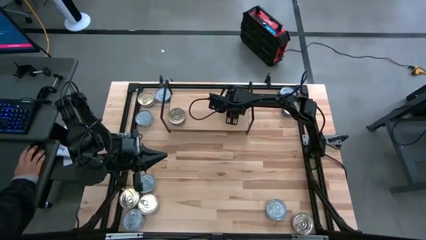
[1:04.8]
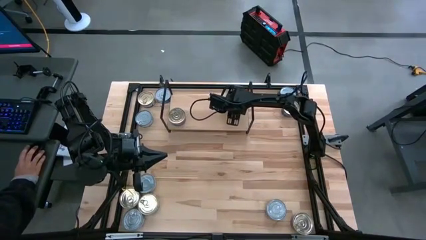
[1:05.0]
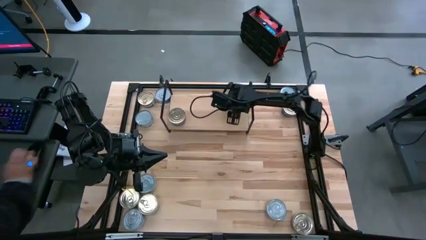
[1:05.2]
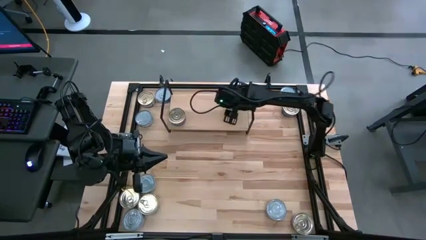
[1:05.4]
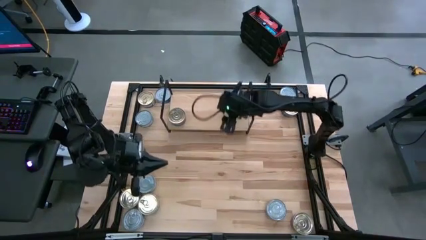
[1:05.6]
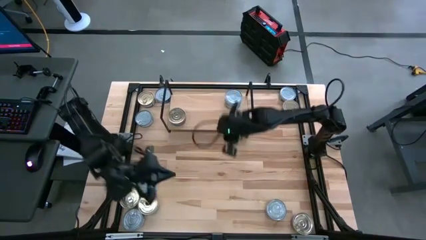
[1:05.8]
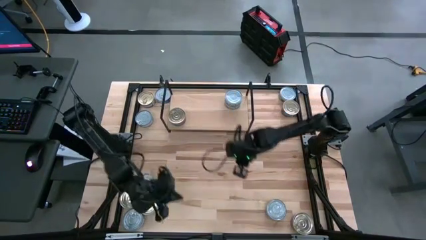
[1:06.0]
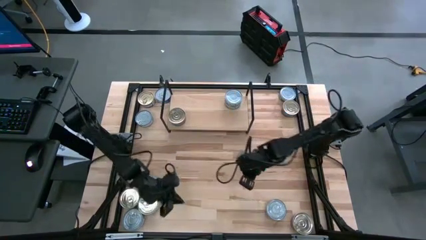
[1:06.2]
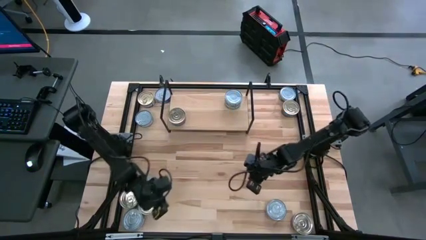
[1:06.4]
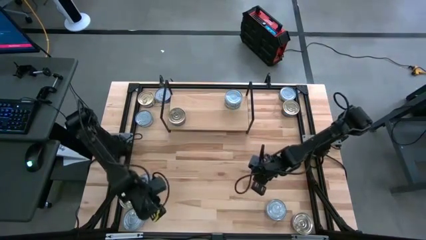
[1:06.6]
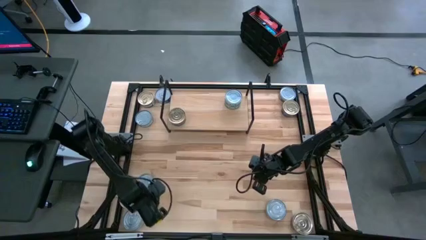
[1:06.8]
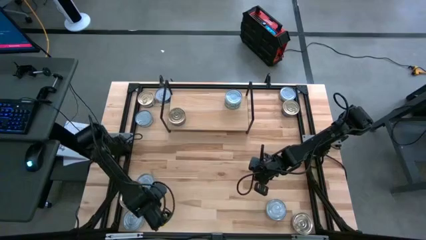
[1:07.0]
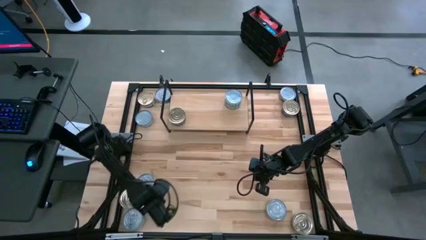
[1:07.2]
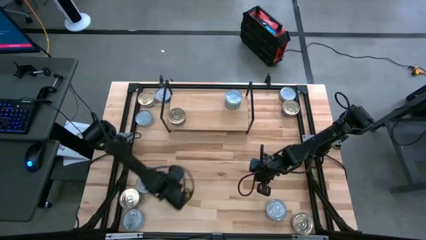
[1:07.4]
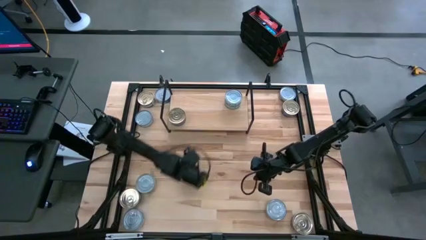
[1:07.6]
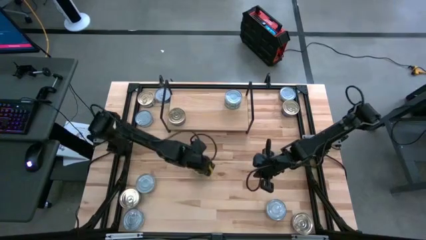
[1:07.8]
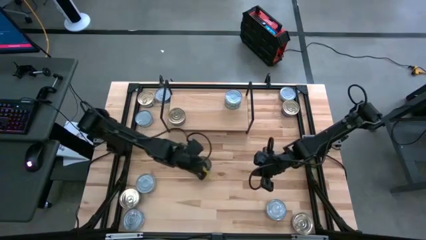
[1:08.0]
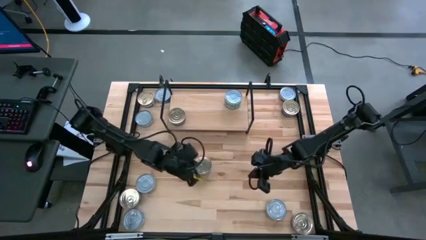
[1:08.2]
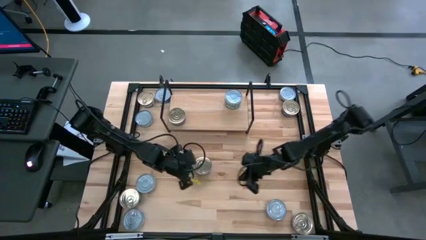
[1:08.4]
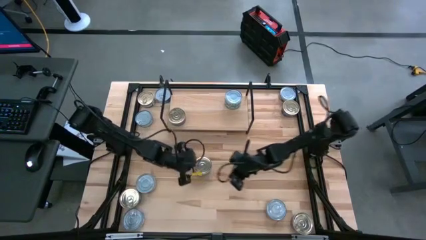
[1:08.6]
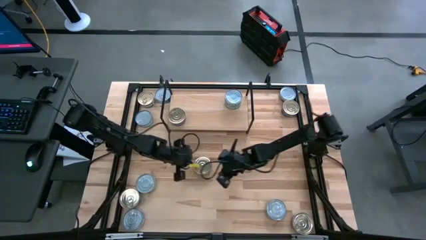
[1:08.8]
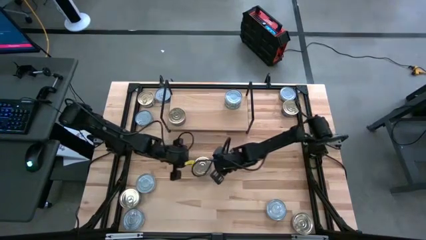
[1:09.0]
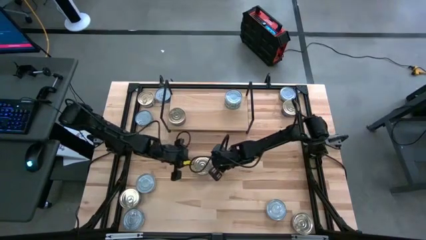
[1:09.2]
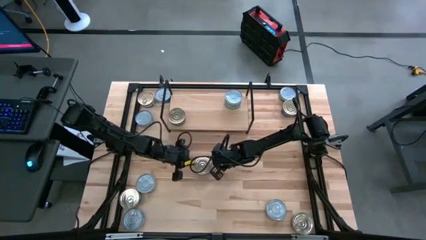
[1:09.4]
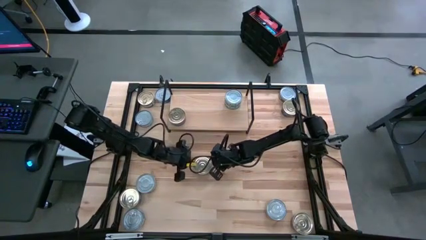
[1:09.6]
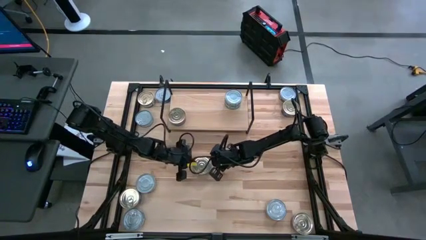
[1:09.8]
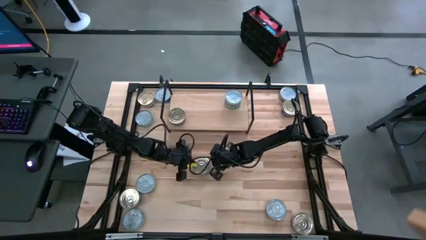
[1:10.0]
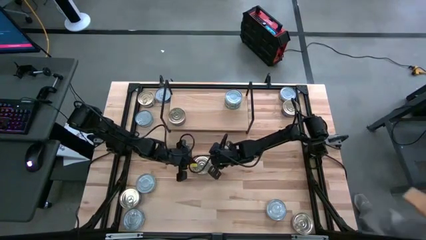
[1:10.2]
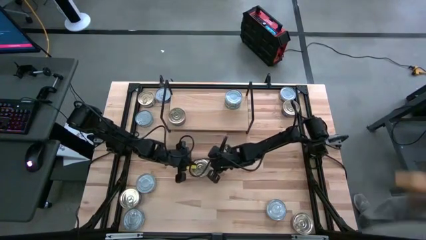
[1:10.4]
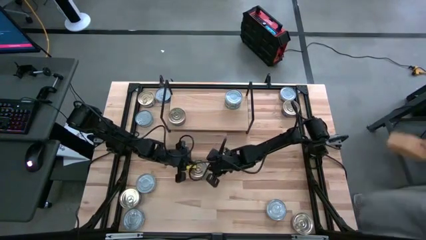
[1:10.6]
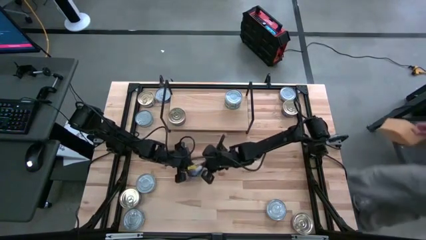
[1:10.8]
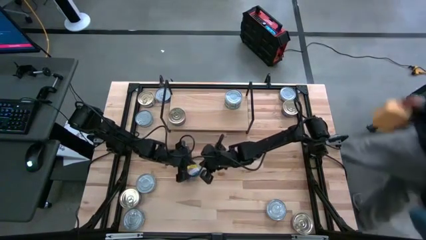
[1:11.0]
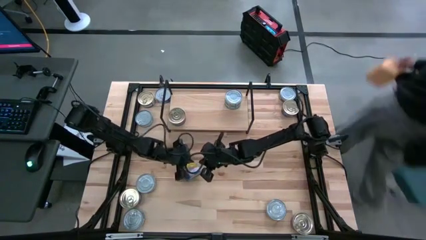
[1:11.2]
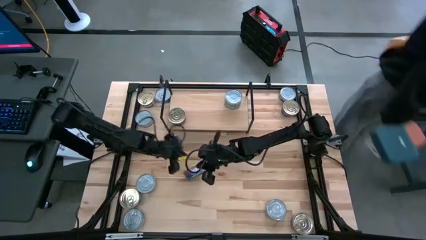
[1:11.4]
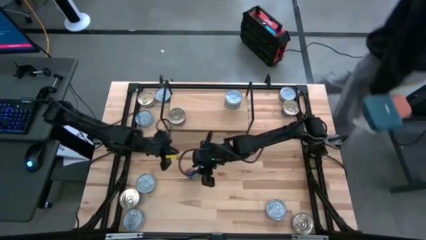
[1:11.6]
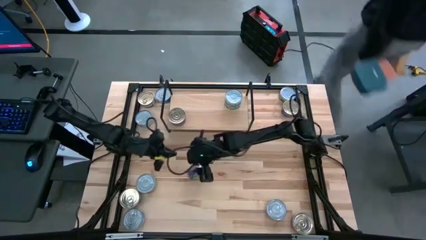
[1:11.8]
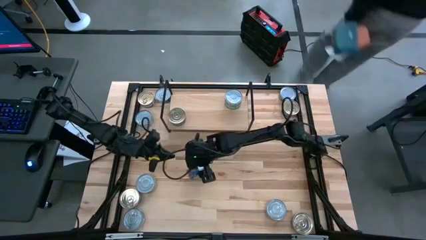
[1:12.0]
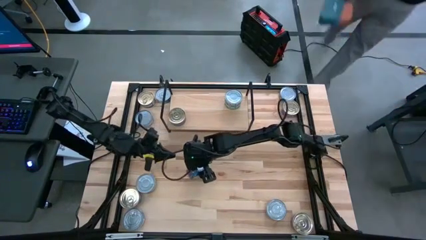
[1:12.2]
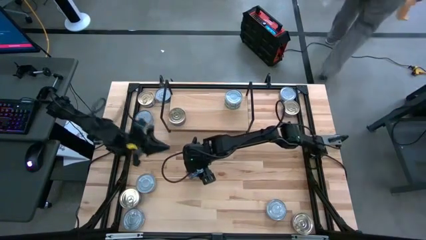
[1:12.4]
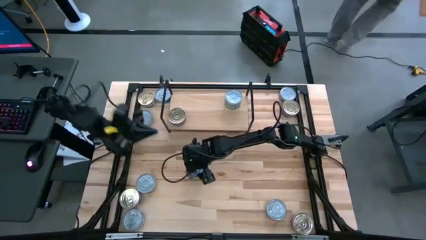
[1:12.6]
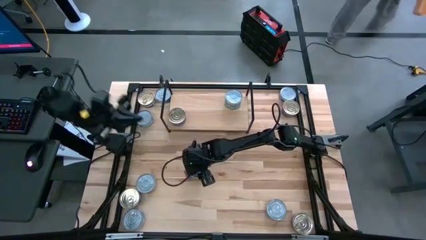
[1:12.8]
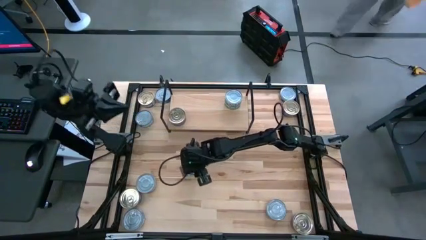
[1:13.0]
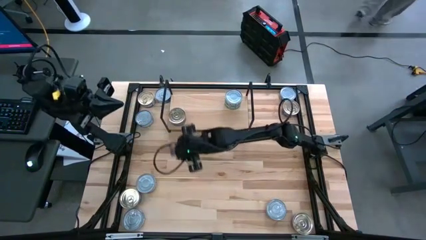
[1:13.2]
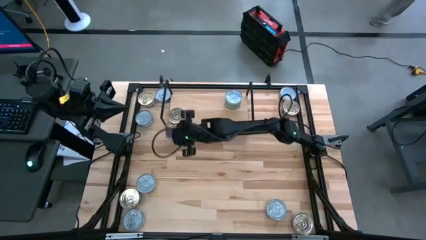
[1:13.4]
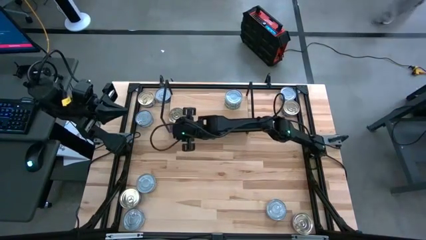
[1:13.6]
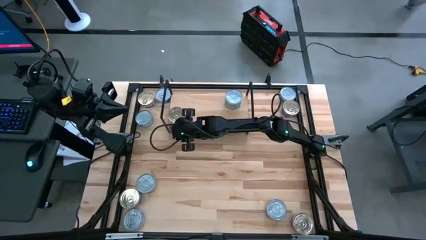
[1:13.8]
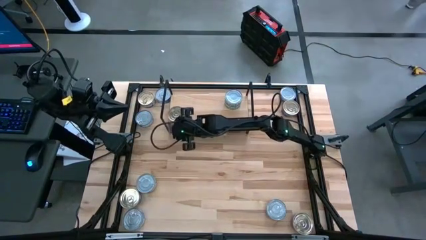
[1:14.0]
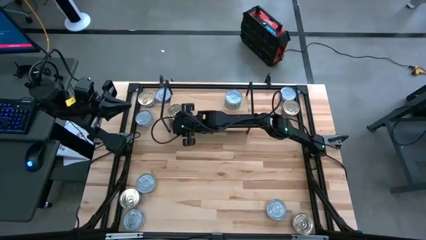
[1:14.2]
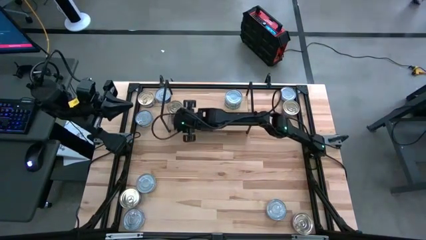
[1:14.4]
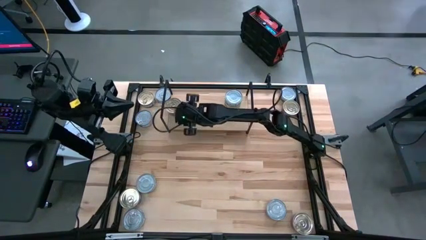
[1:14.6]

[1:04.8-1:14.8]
Task: Stack canned seafood by type on shelf
Put the blue and pink can on the shelf
